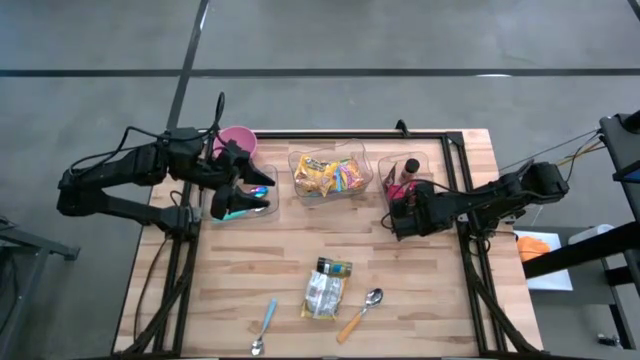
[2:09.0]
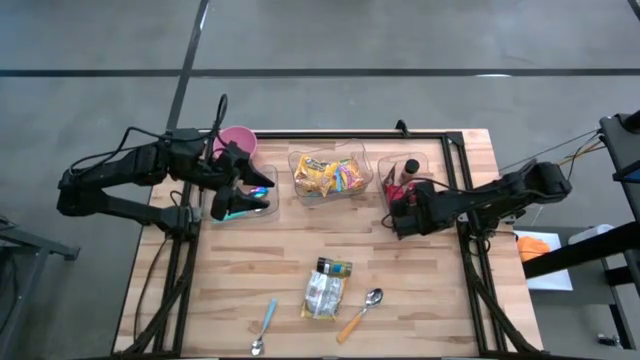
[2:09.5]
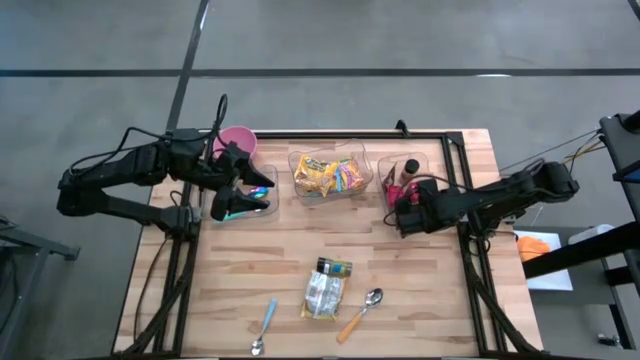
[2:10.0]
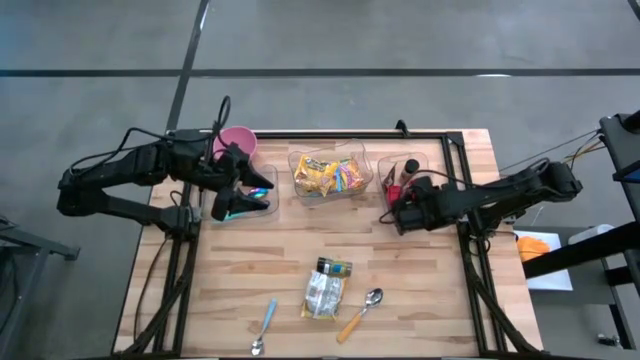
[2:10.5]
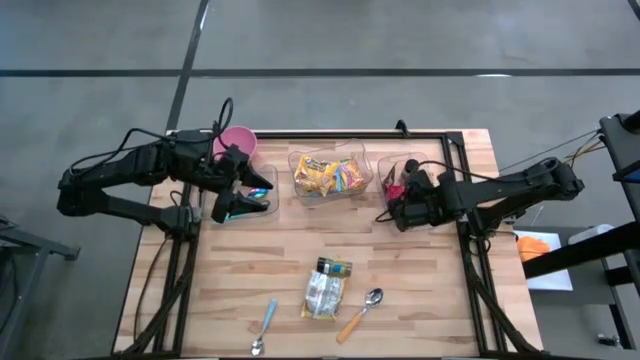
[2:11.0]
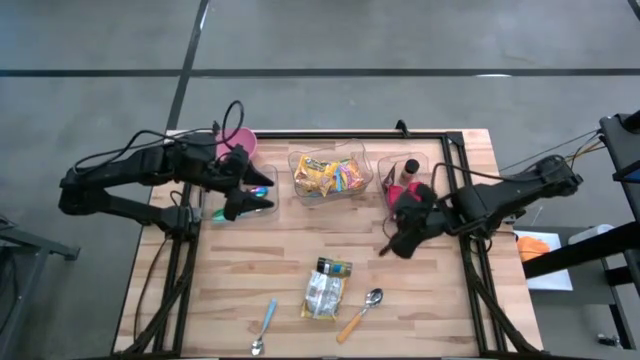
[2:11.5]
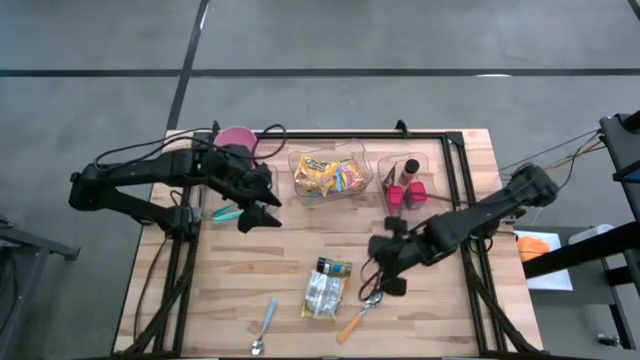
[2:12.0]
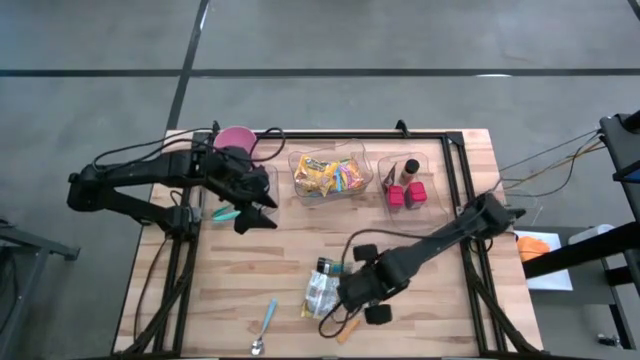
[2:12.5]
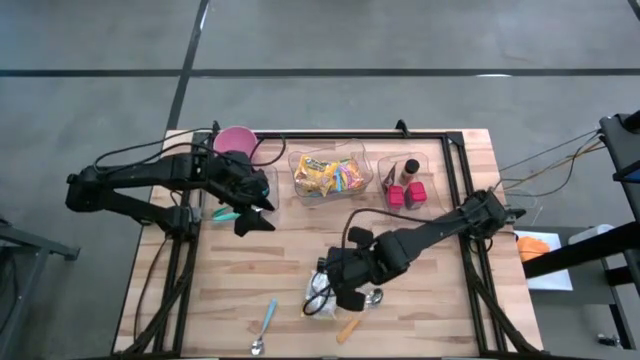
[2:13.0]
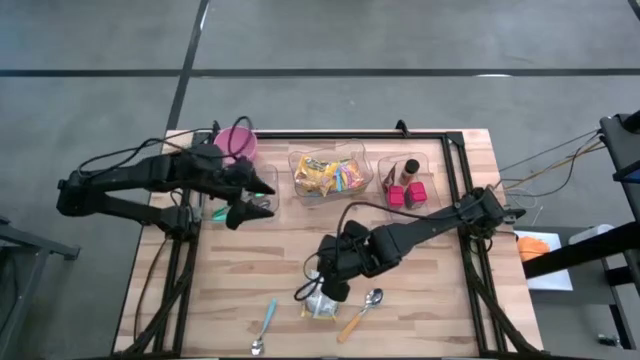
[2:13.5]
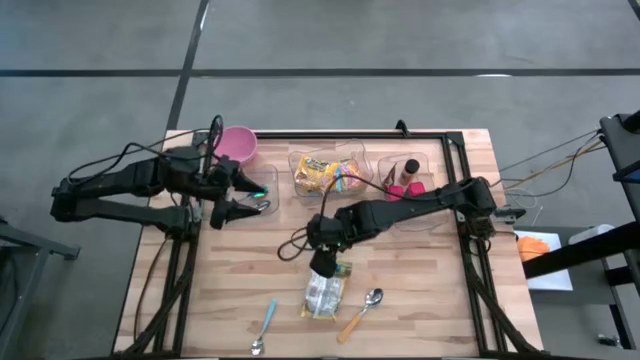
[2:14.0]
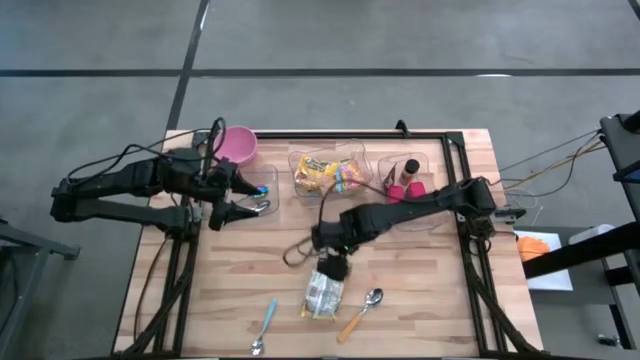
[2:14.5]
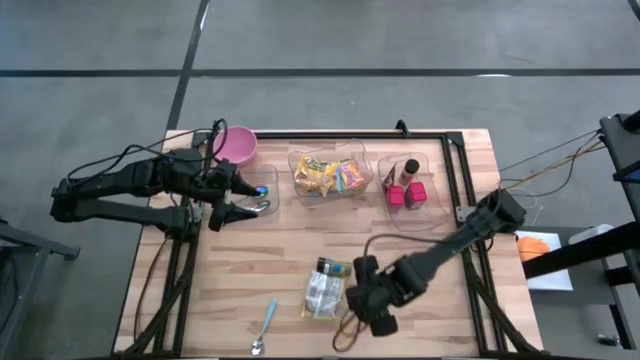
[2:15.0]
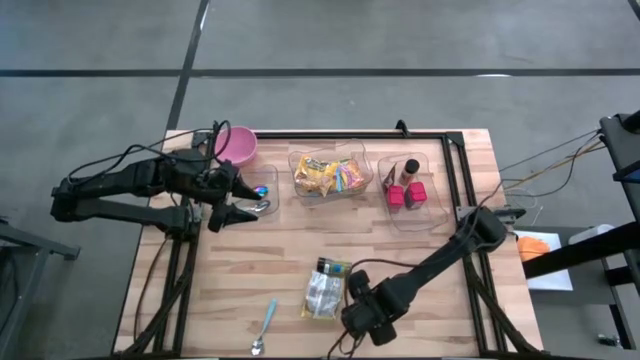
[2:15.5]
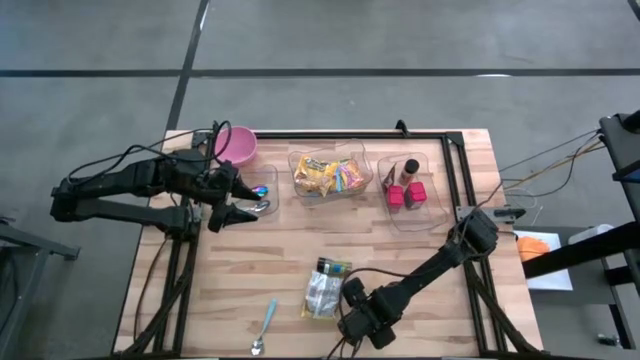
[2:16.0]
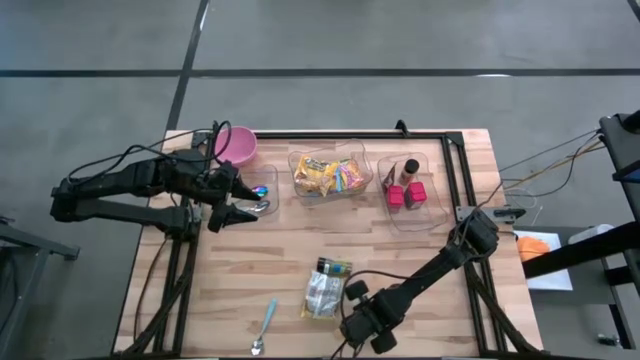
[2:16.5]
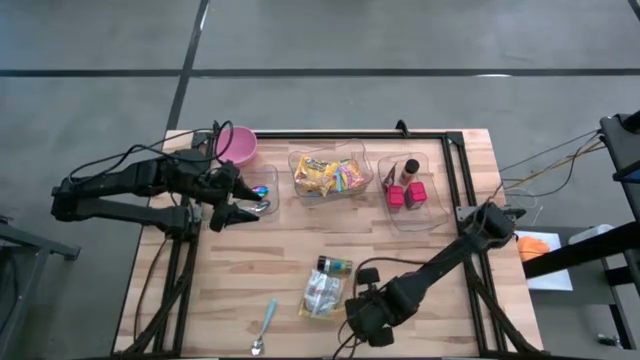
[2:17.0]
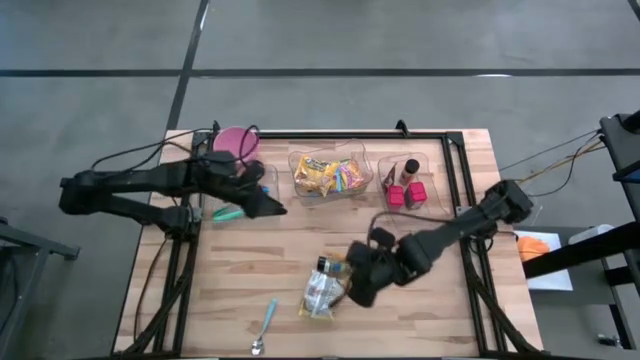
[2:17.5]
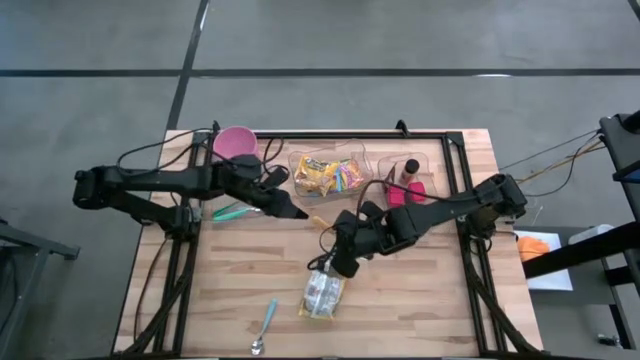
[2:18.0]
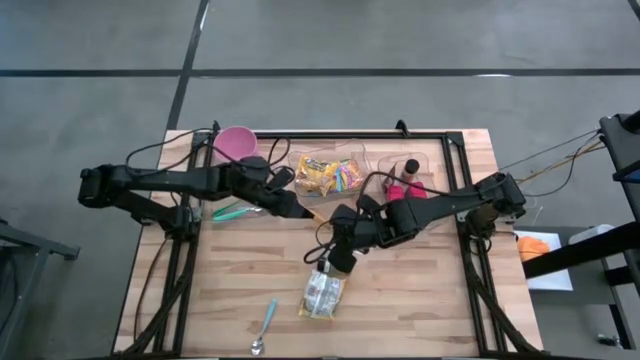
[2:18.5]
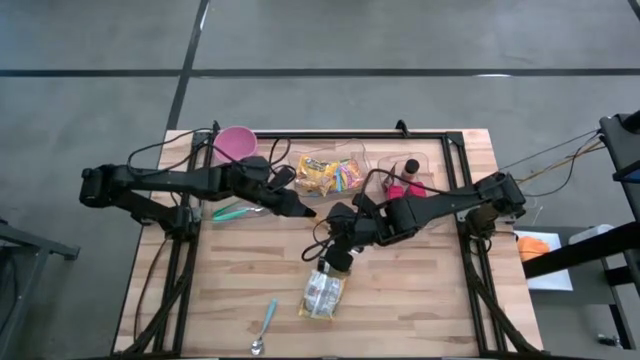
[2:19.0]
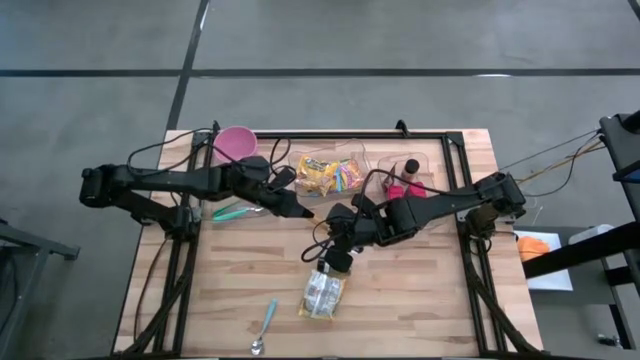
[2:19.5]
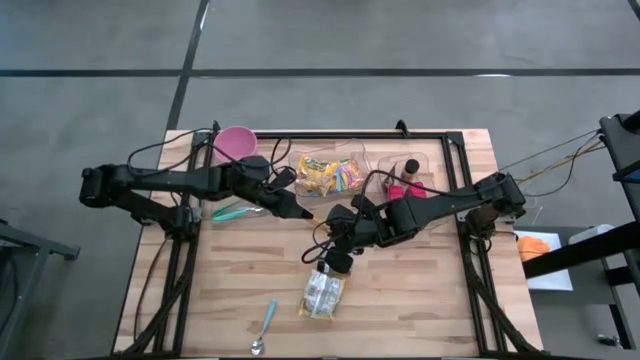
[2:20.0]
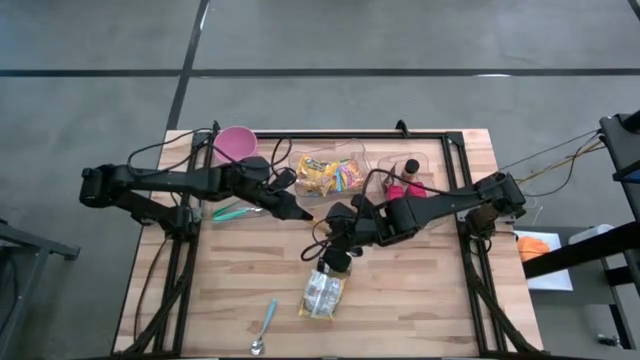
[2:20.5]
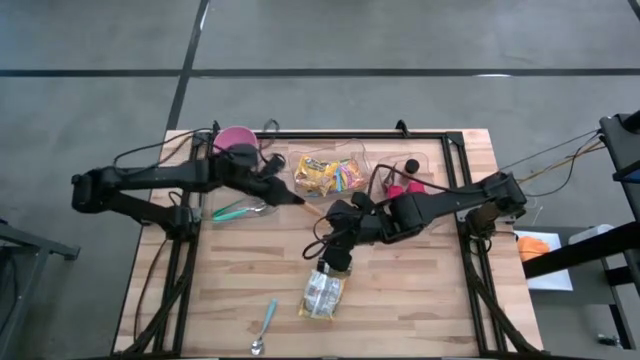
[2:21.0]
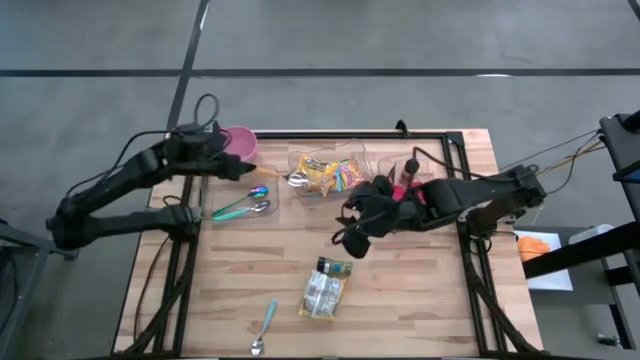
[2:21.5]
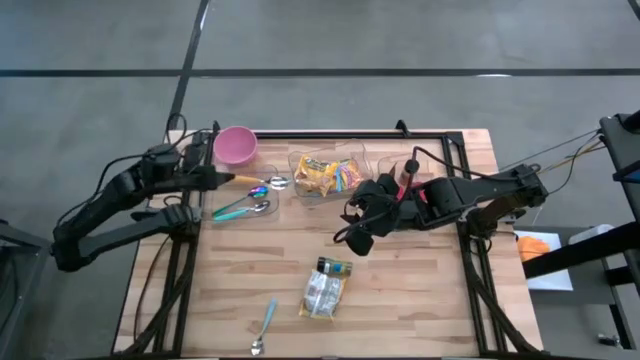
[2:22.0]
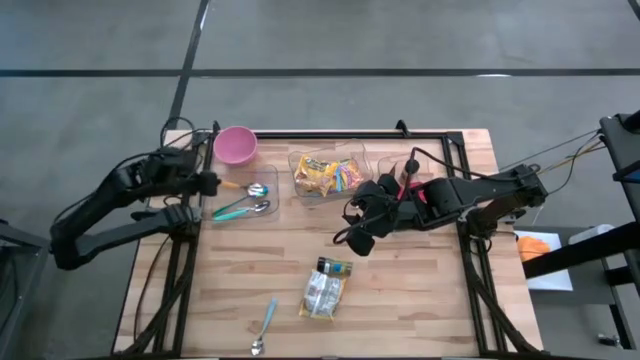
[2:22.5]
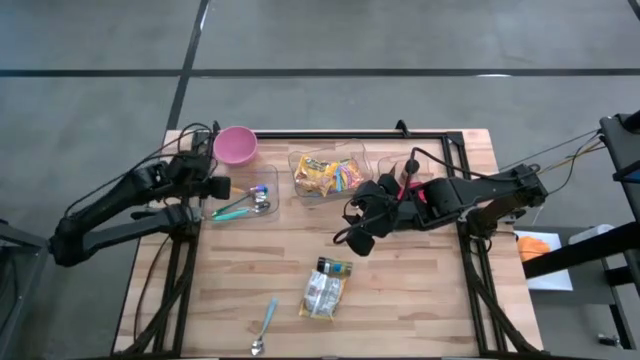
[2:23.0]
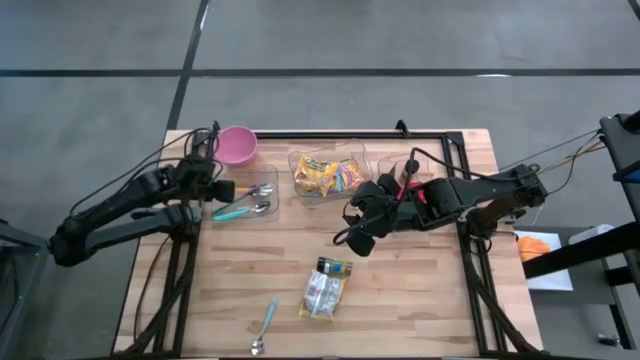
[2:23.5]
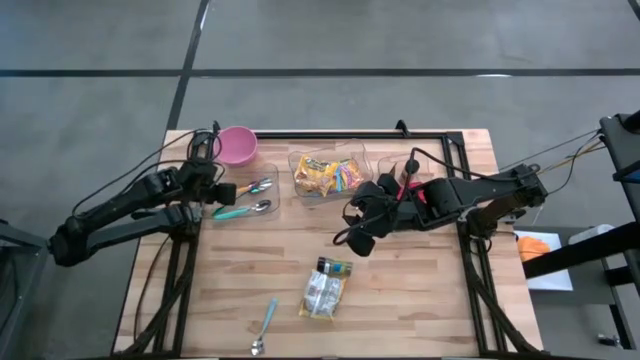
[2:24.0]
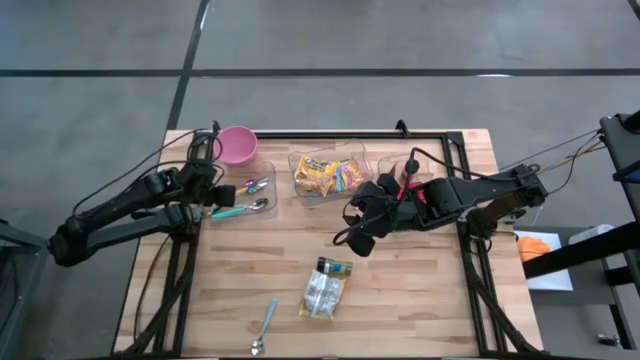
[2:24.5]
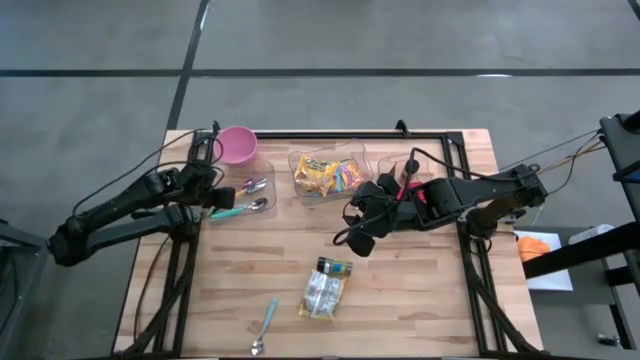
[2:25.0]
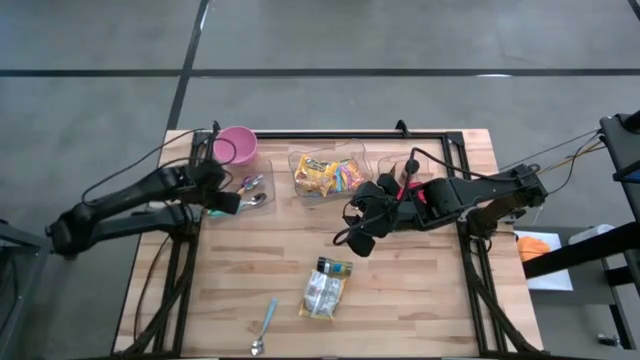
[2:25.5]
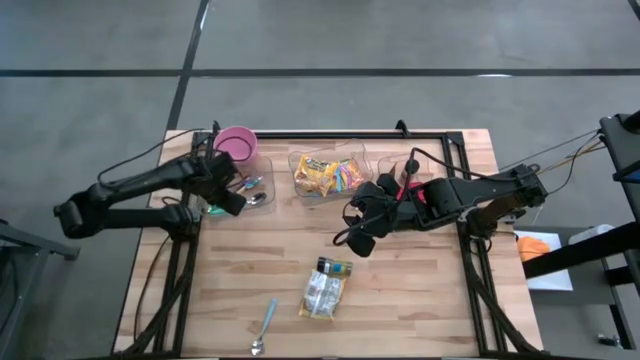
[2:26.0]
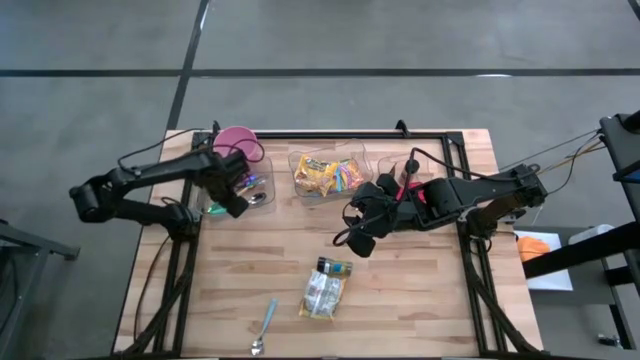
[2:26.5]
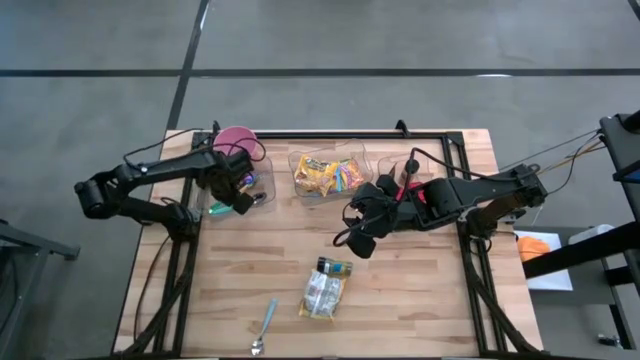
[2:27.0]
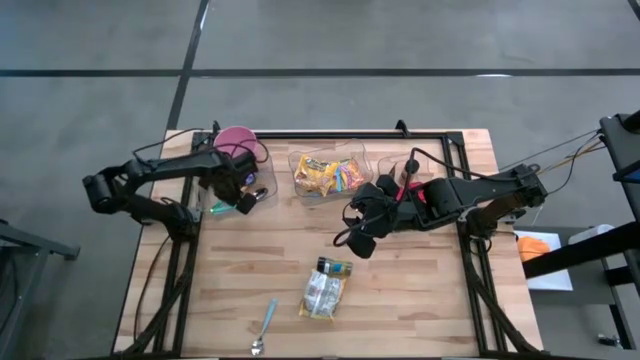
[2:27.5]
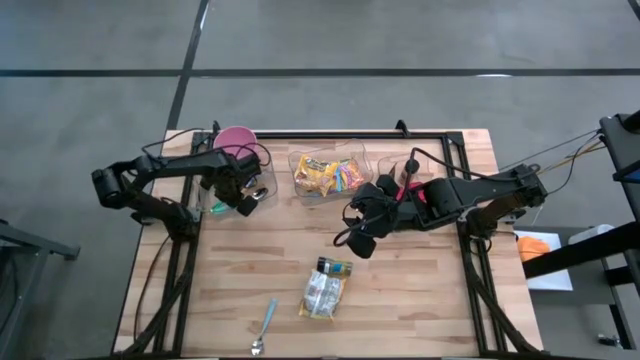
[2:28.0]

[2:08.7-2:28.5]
Put the yellow spoon into the left transparent bin
